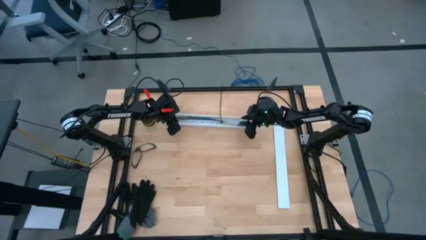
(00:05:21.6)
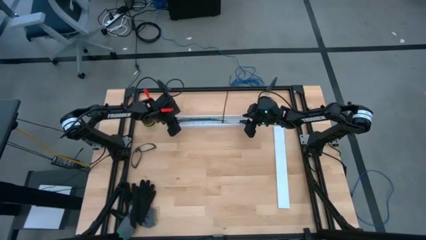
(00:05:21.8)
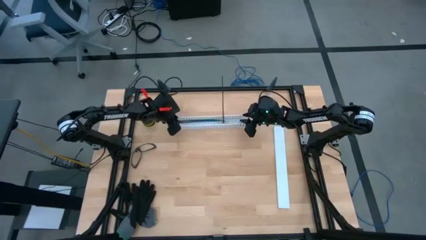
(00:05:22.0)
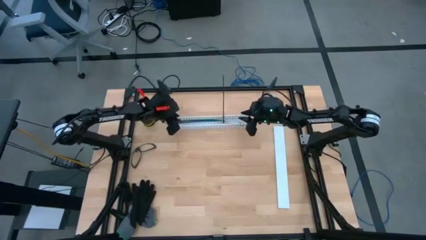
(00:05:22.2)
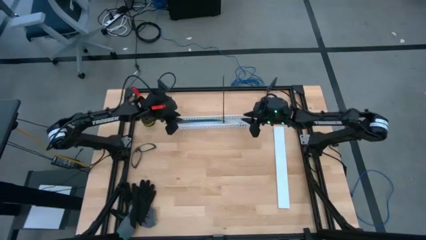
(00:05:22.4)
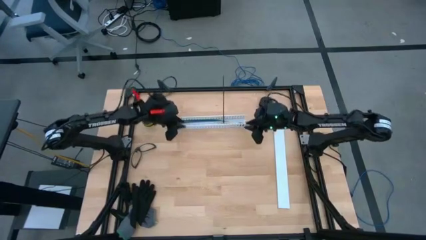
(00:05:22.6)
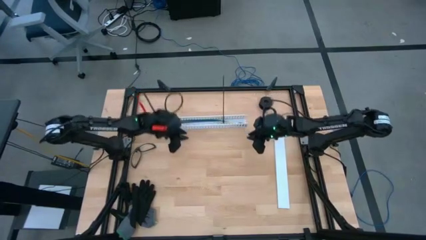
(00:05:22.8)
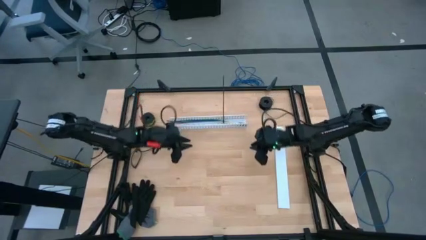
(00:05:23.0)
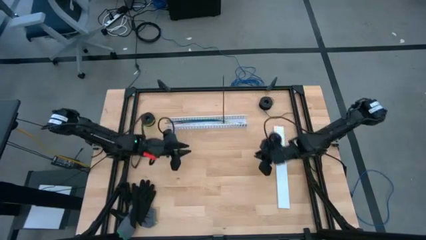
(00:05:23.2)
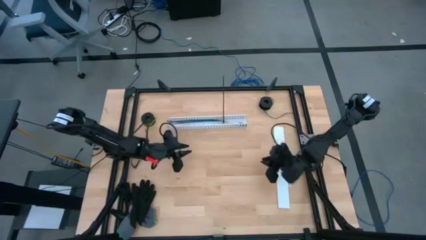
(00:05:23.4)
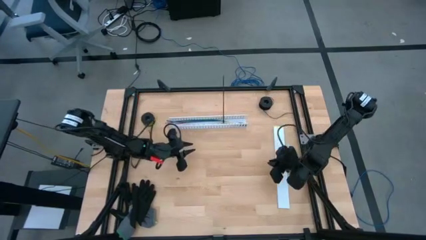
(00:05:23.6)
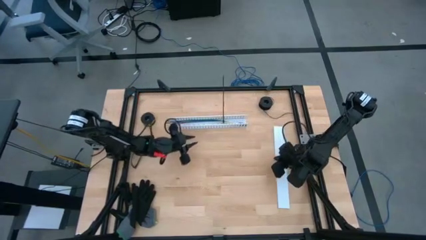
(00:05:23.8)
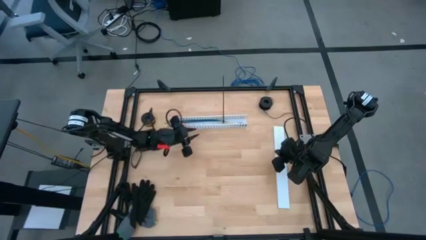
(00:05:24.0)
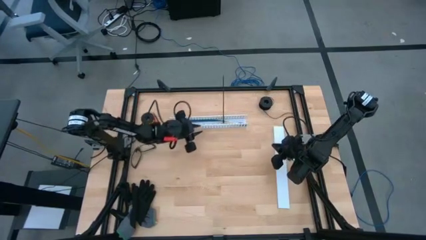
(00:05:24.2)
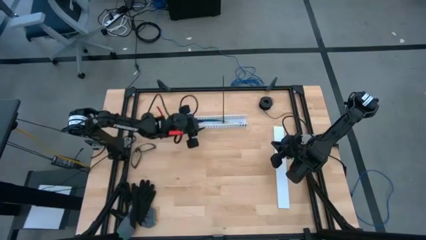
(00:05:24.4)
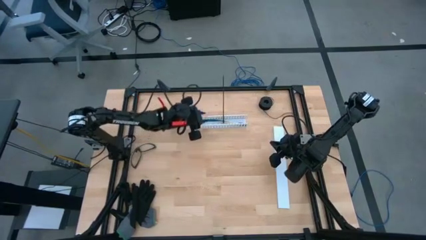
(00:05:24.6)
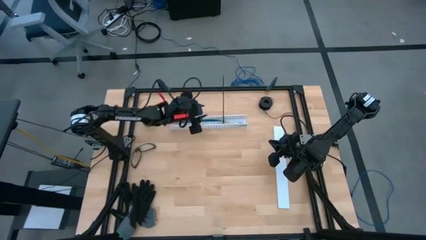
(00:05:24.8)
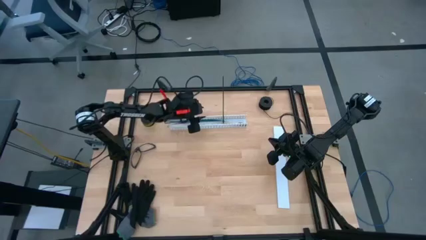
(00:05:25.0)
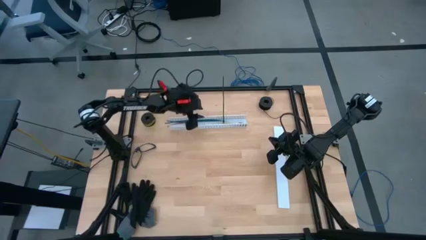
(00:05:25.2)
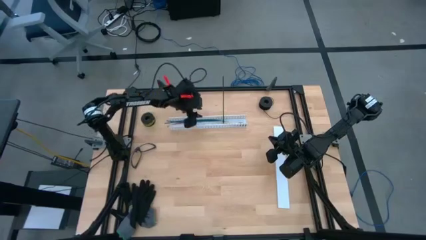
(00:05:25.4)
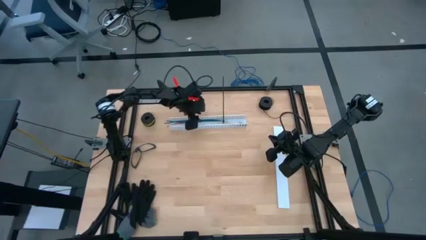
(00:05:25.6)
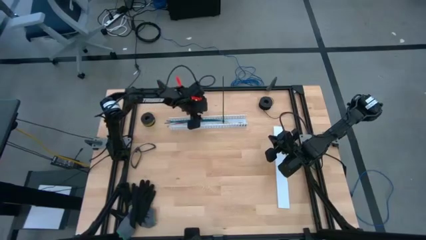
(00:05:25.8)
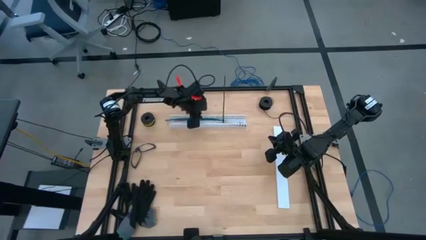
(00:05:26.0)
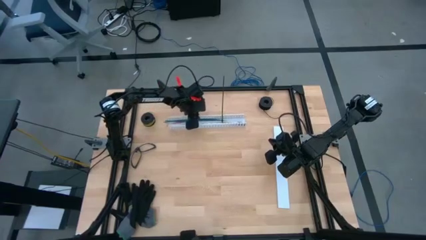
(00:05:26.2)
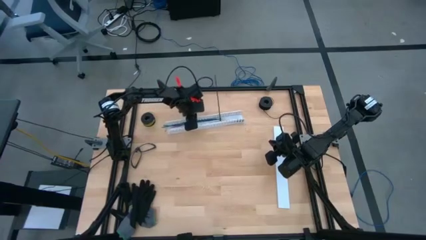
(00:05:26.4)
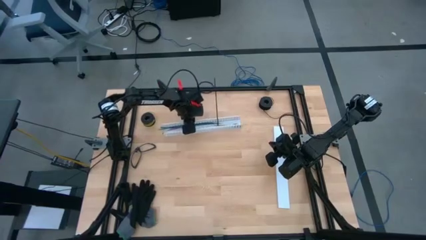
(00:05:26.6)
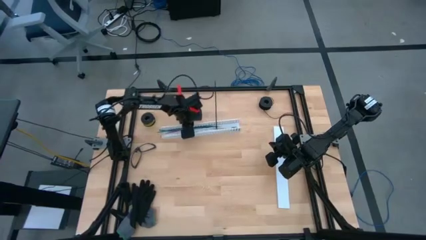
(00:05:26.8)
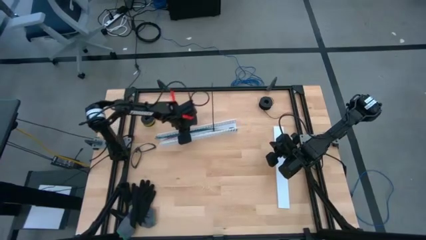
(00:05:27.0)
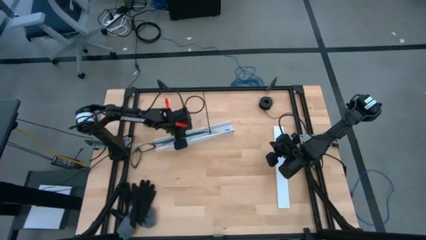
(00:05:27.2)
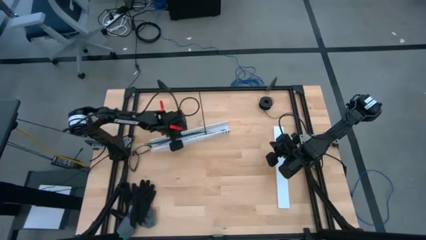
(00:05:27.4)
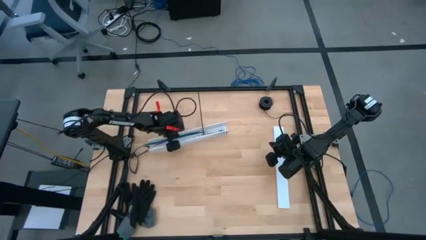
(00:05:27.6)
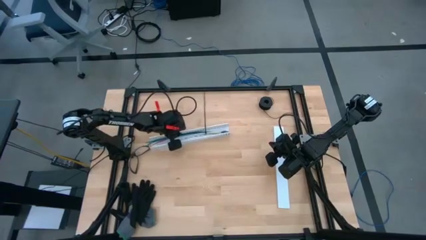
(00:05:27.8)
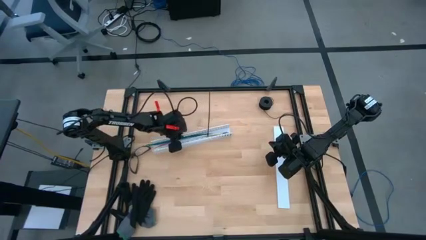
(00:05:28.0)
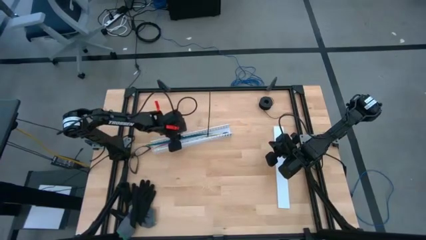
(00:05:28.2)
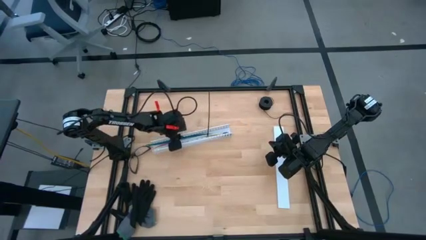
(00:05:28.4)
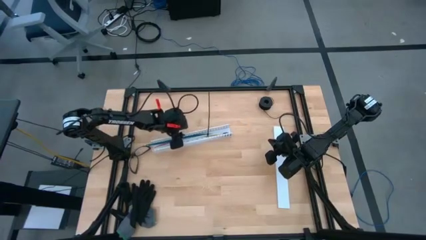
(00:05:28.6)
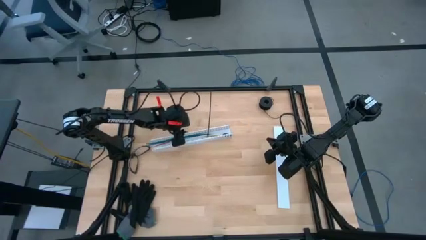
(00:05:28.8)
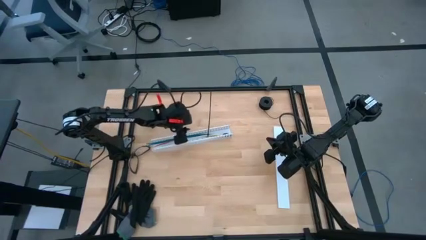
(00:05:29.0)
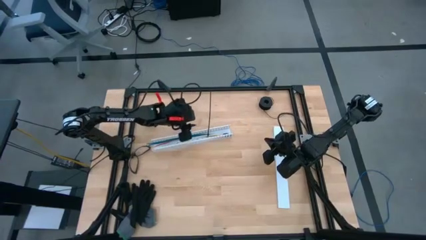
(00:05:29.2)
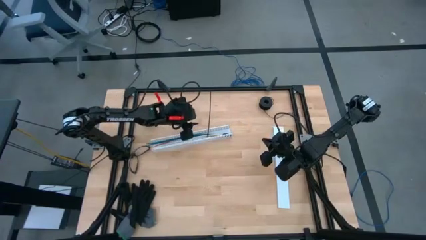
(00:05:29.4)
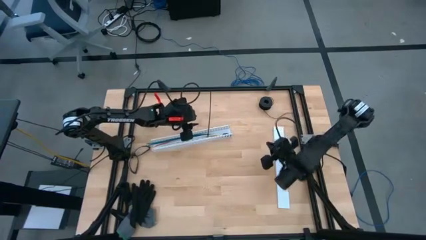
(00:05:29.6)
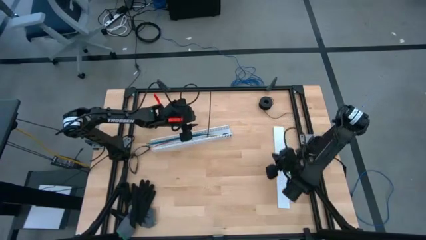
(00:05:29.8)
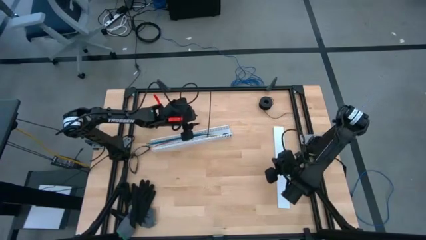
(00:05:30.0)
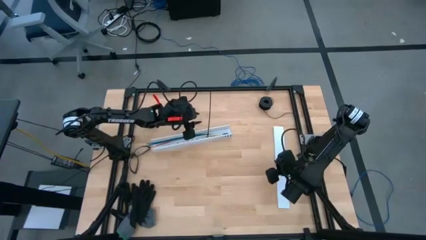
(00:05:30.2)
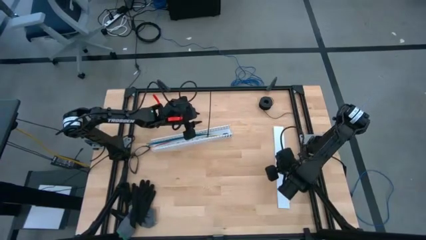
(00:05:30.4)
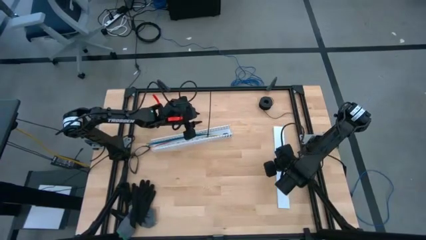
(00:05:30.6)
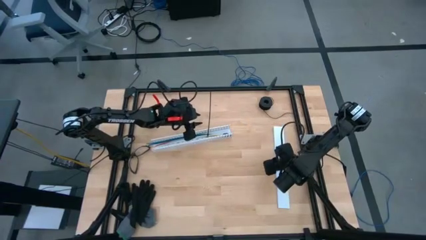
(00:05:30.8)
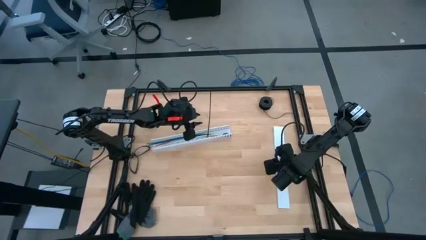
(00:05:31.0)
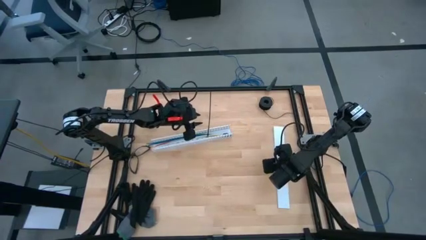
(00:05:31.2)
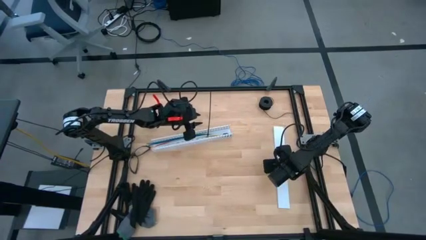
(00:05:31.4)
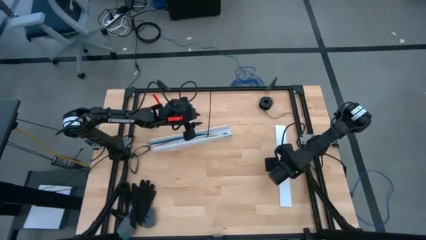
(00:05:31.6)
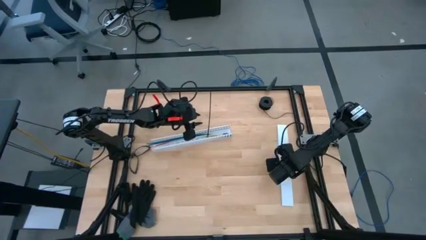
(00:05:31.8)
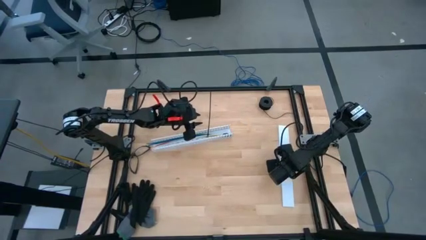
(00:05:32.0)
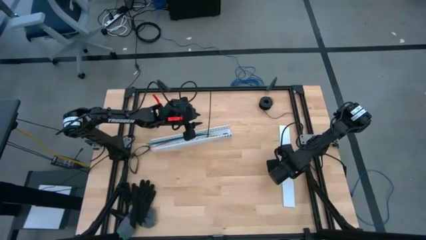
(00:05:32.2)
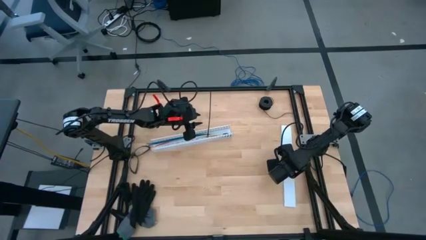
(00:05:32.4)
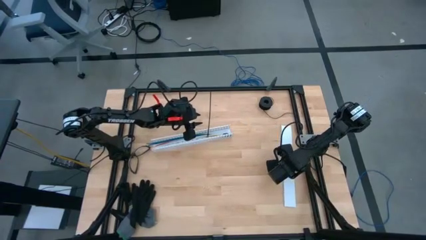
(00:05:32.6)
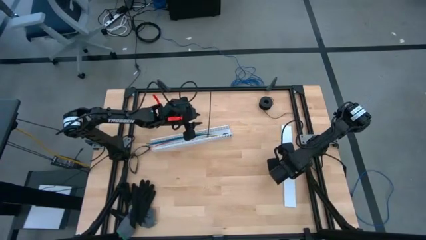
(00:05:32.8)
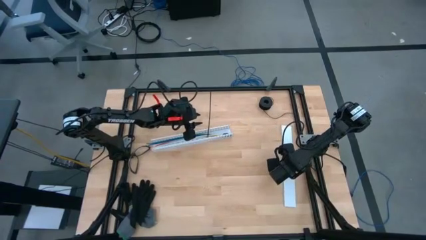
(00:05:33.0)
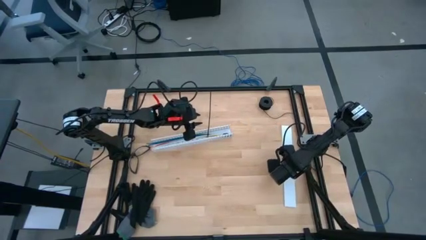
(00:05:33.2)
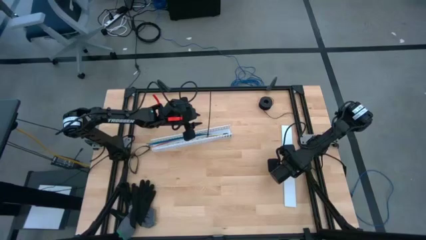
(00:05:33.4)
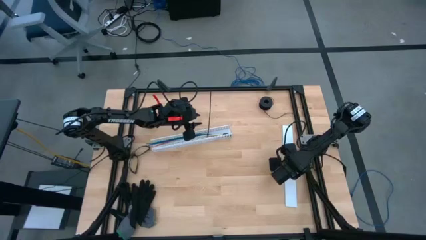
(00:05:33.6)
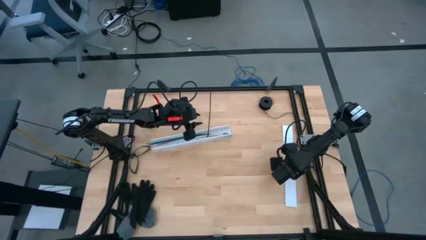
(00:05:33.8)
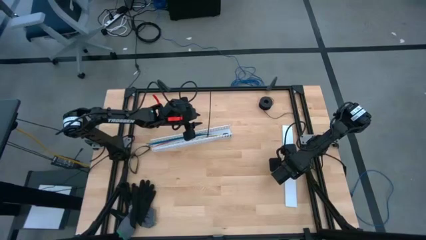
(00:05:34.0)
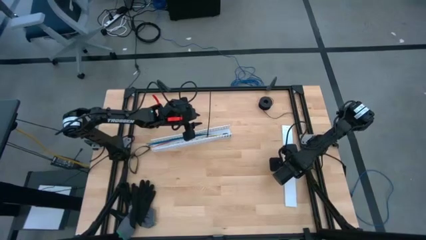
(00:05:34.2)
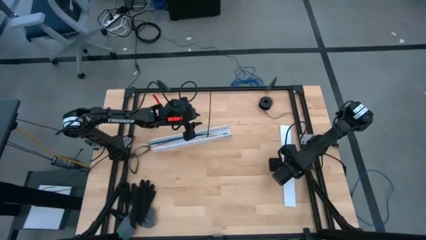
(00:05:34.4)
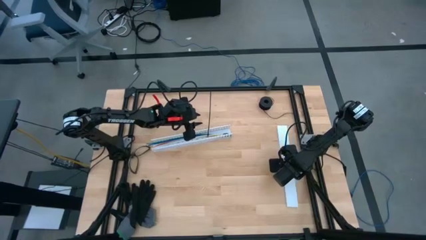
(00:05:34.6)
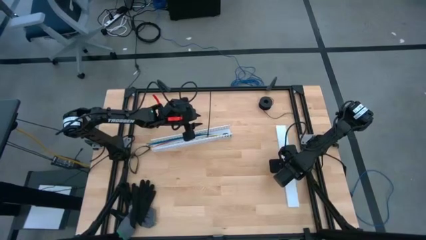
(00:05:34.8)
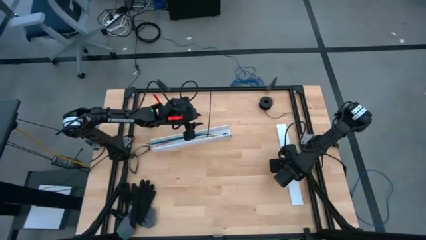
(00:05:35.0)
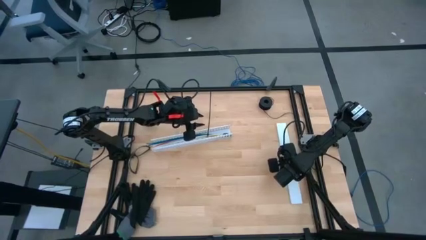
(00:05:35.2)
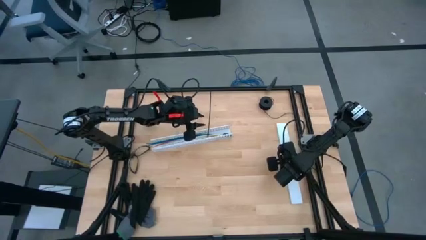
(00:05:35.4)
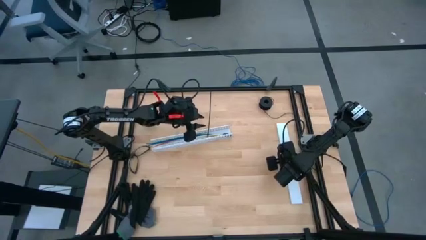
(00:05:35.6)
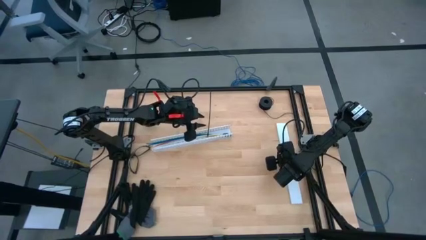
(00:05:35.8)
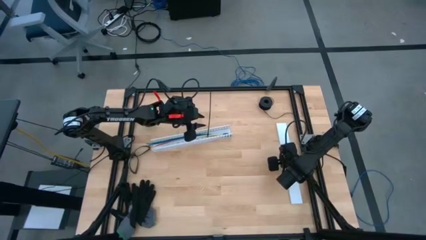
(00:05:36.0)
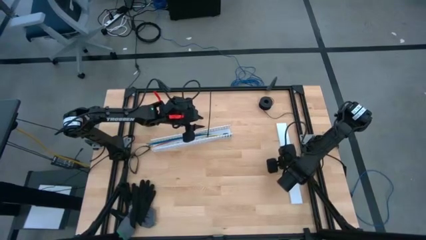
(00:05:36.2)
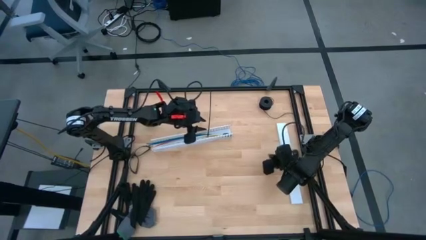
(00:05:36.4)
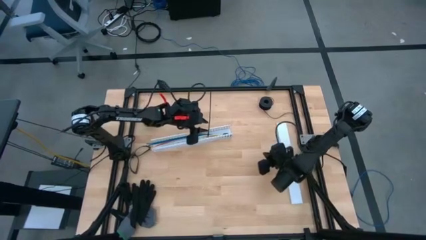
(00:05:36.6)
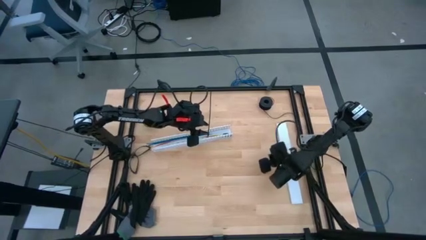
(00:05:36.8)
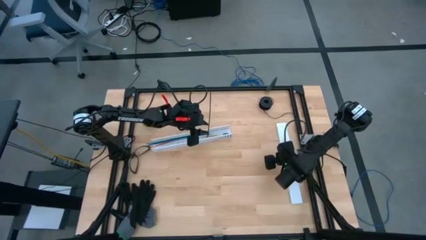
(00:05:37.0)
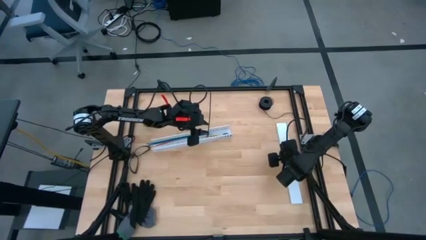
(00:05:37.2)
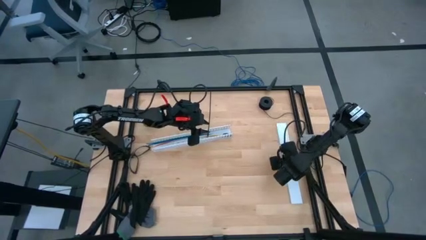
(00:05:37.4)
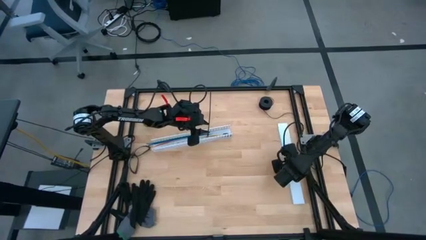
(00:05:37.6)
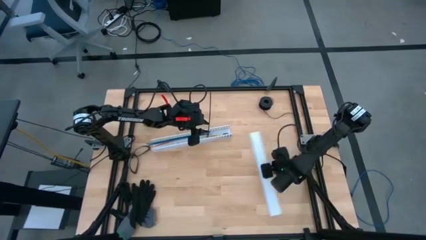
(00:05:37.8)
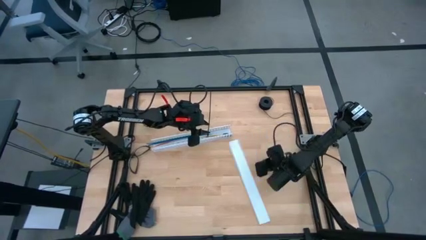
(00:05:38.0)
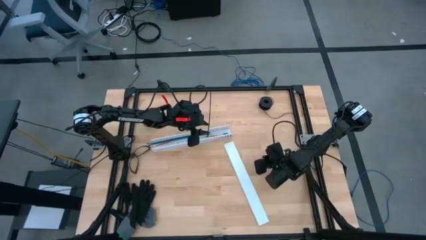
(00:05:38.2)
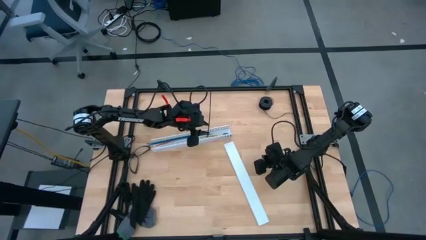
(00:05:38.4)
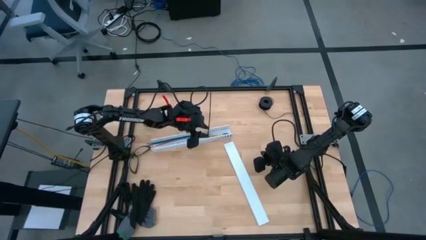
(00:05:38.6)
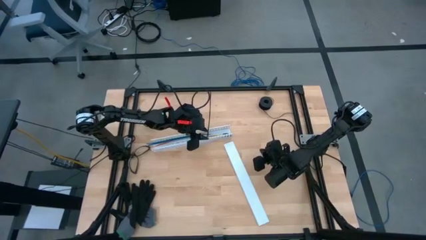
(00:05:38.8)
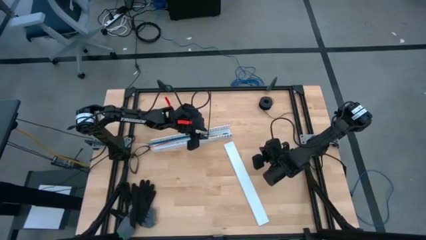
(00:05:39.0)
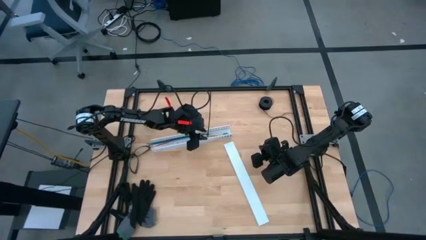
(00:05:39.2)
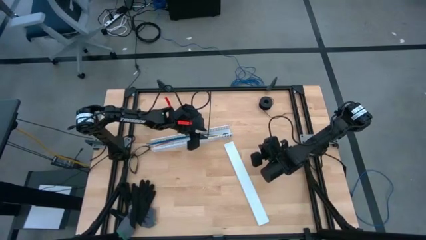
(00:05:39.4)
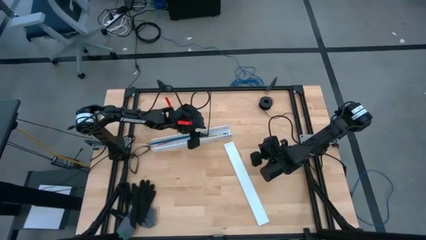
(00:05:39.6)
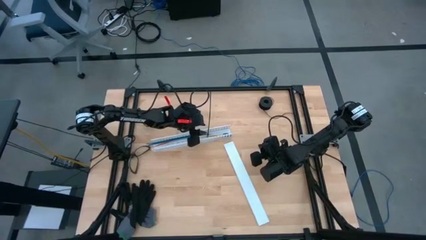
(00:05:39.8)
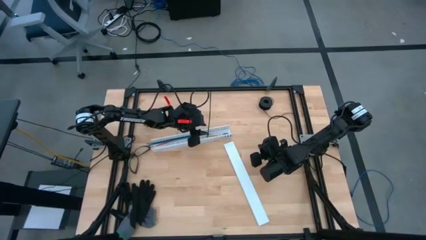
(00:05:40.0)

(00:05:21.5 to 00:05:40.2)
Task: Ziptie cables
Close the white cable duct
